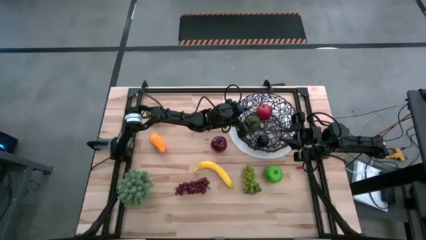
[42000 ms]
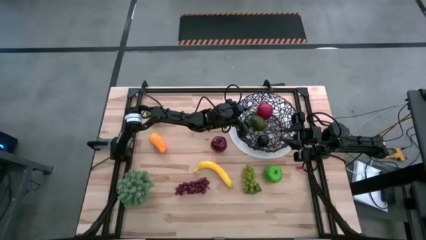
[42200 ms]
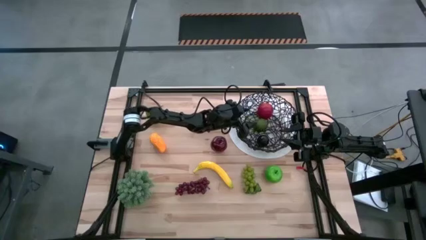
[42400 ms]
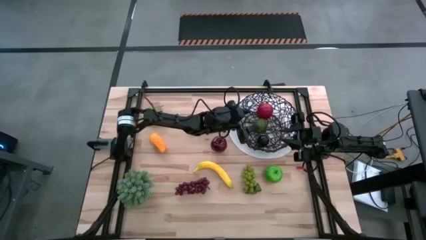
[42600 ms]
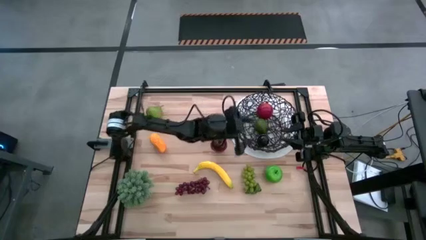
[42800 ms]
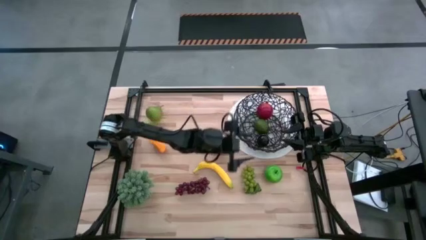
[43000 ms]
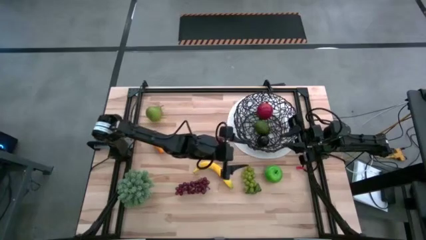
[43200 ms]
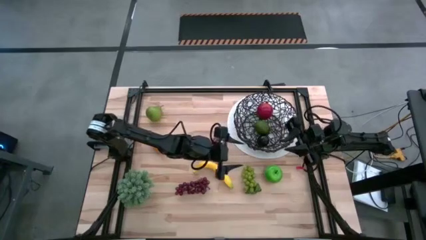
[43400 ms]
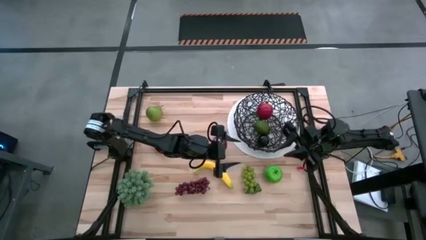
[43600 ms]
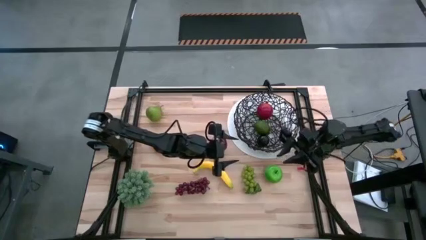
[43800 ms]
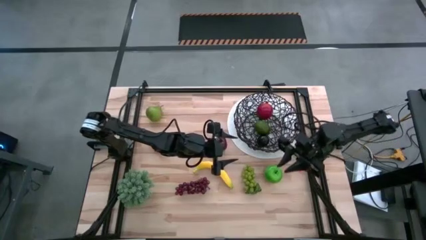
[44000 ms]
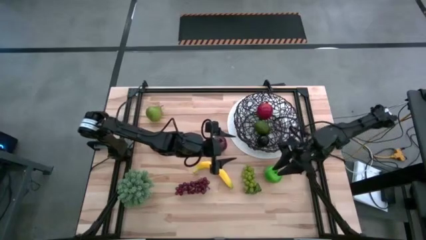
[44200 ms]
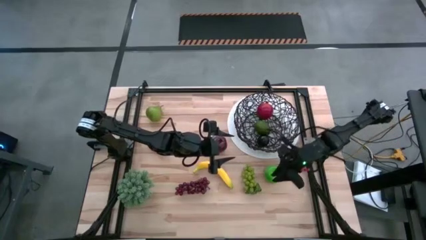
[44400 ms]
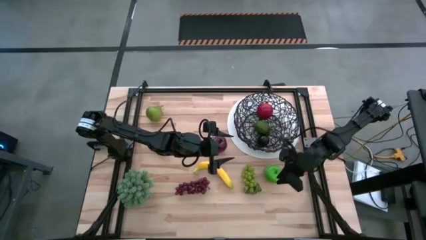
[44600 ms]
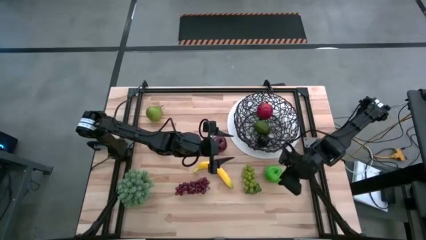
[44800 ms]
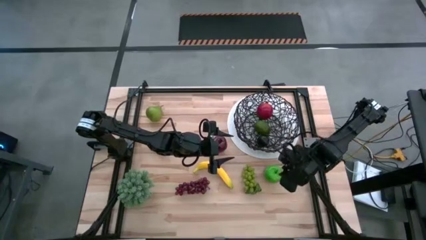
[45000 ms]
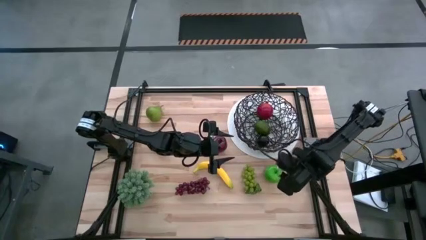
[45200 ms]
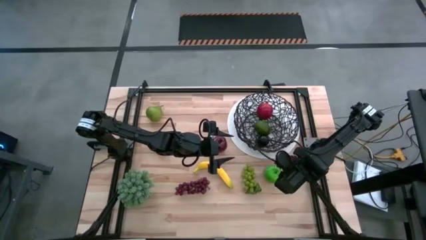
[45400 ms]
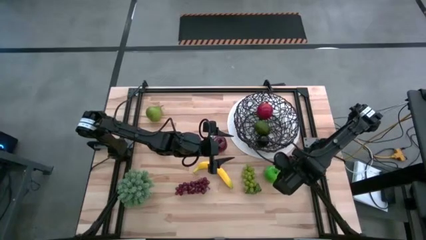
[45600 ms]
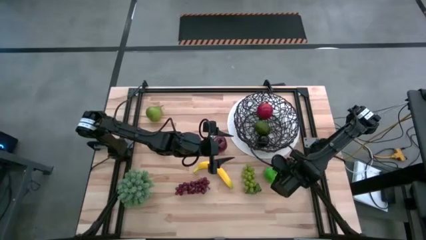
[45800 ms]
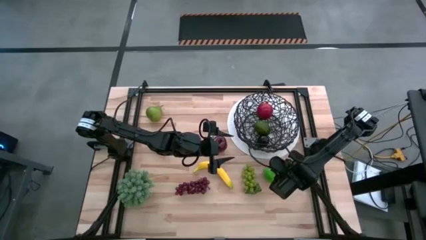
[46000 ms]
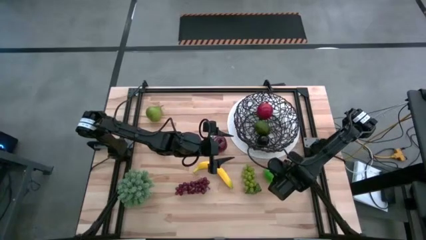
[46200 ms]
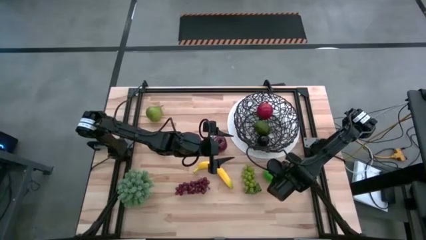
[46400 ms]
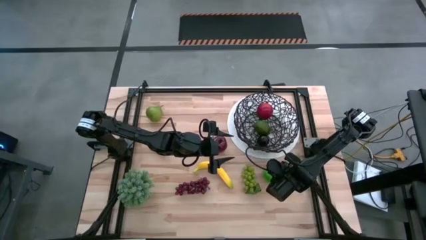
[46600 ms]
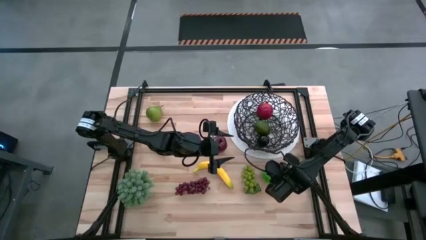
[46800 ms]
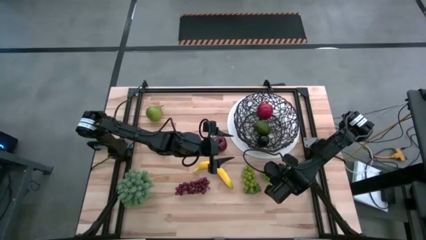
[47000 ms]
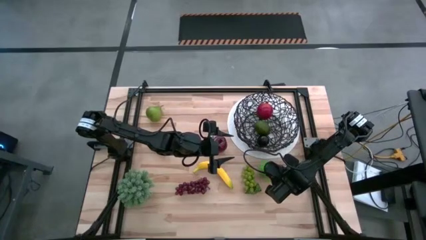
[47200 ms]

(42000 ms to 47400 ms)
Task: Build produce basket
Put the green apple into the wire basket

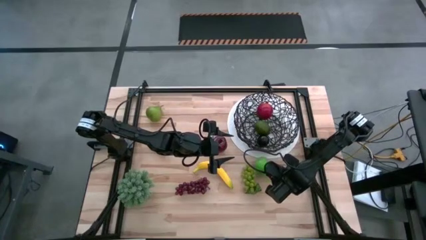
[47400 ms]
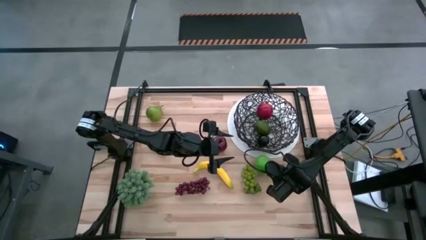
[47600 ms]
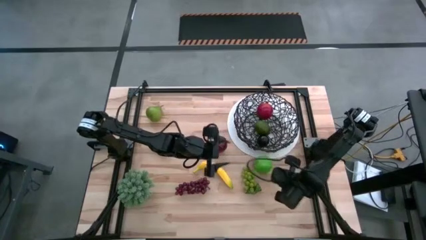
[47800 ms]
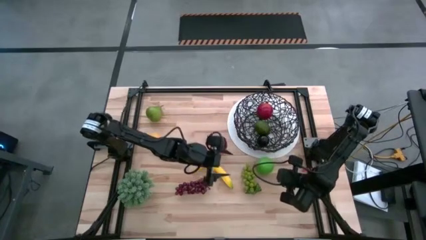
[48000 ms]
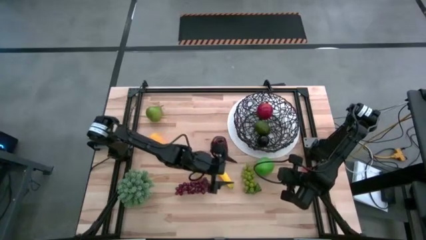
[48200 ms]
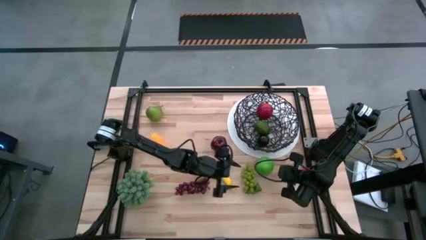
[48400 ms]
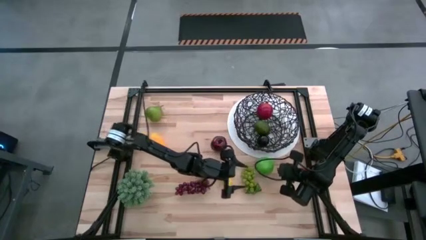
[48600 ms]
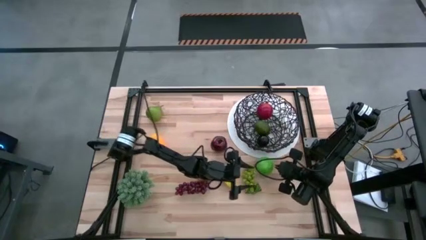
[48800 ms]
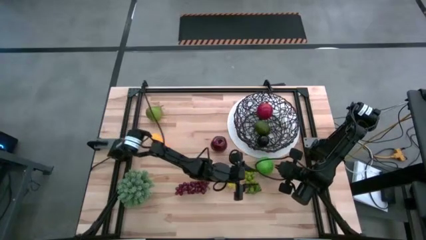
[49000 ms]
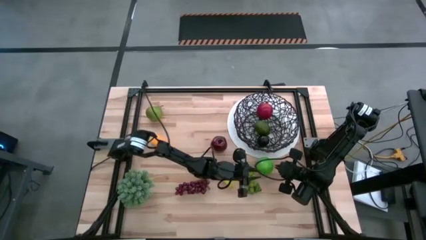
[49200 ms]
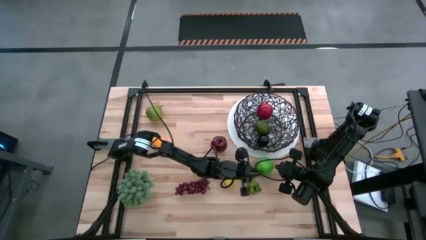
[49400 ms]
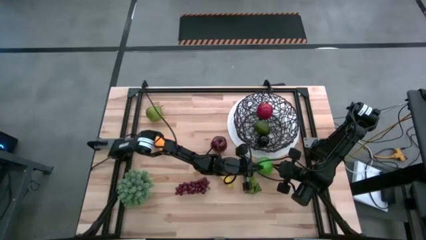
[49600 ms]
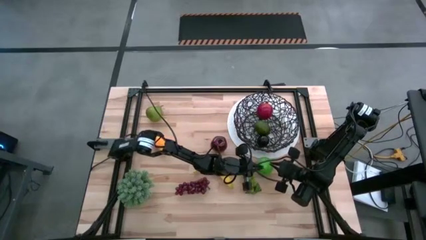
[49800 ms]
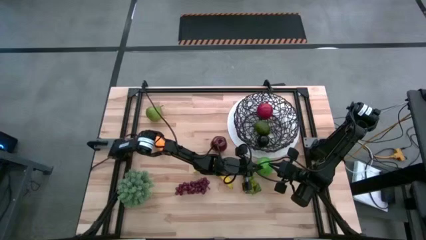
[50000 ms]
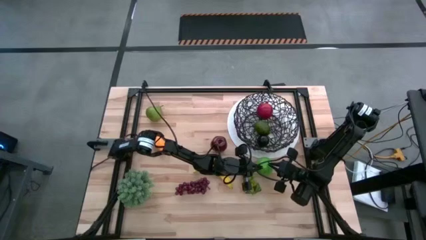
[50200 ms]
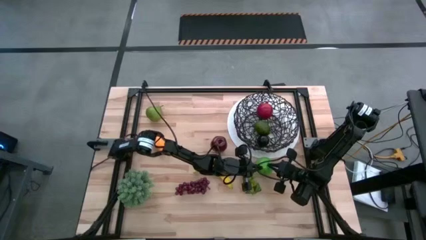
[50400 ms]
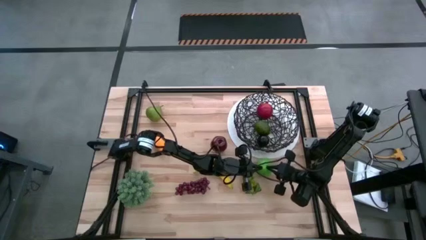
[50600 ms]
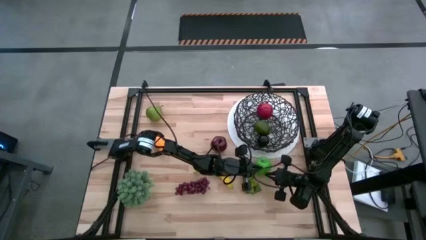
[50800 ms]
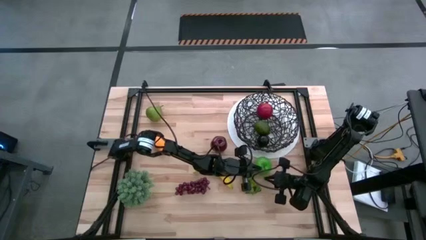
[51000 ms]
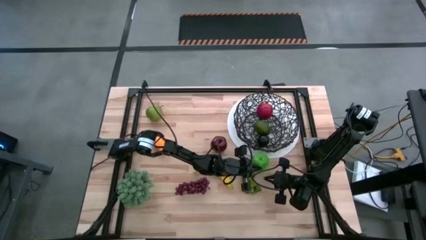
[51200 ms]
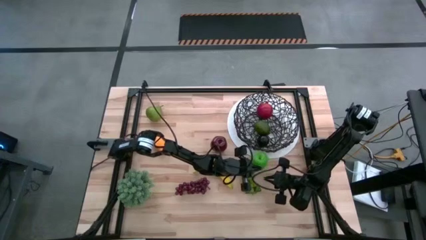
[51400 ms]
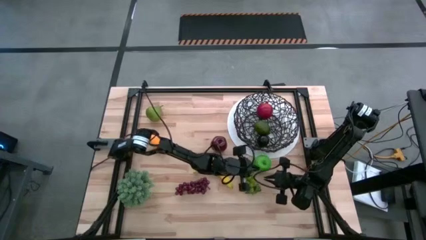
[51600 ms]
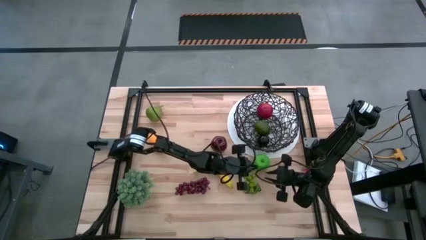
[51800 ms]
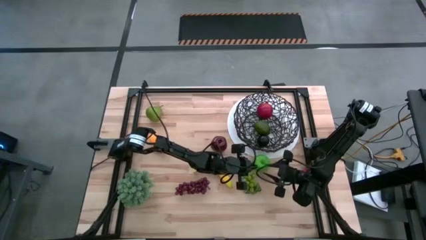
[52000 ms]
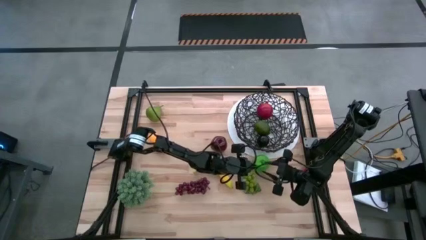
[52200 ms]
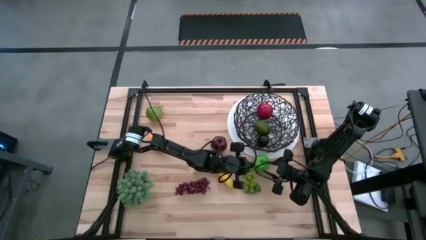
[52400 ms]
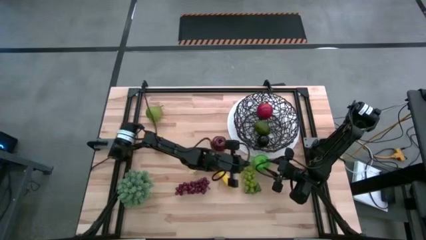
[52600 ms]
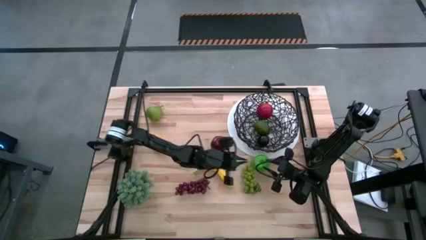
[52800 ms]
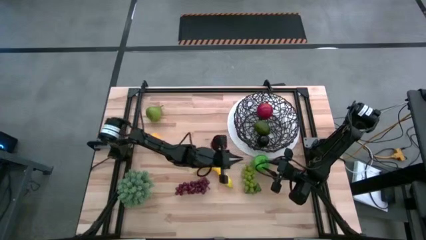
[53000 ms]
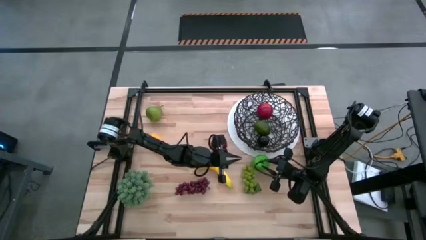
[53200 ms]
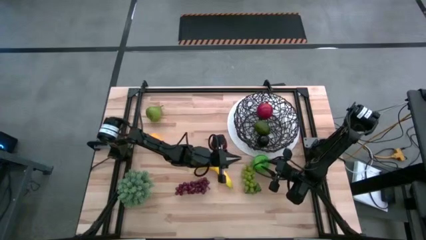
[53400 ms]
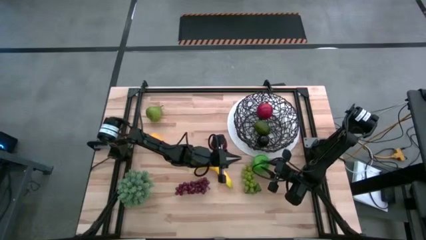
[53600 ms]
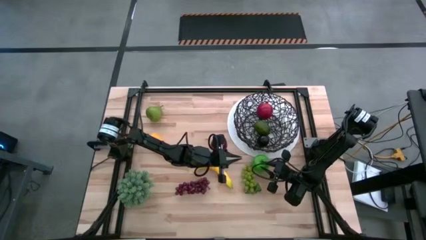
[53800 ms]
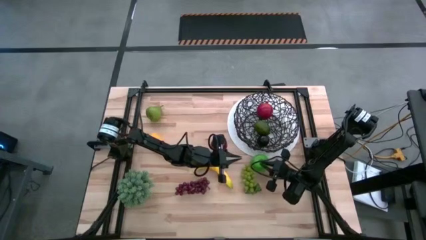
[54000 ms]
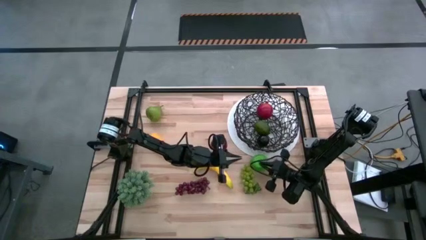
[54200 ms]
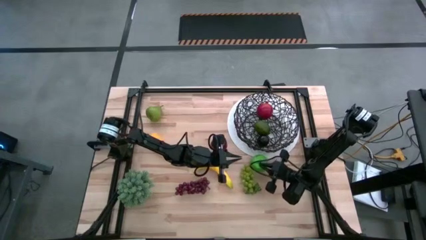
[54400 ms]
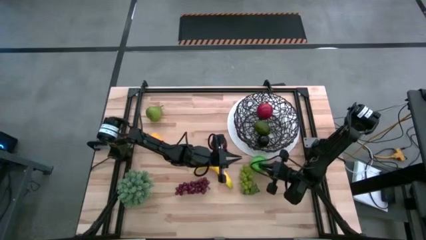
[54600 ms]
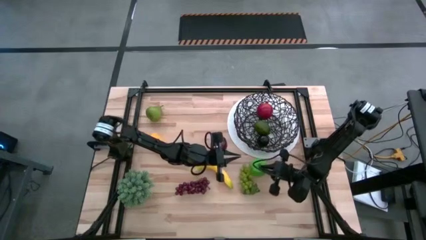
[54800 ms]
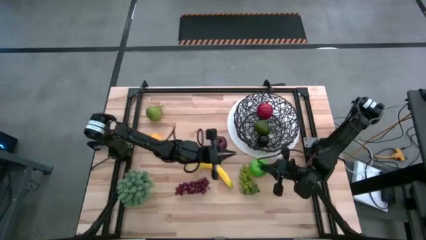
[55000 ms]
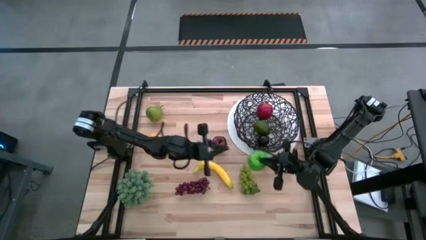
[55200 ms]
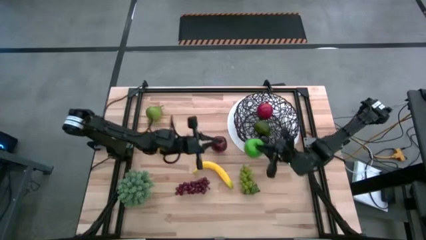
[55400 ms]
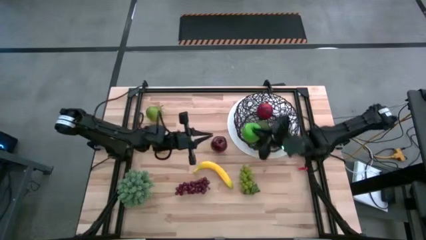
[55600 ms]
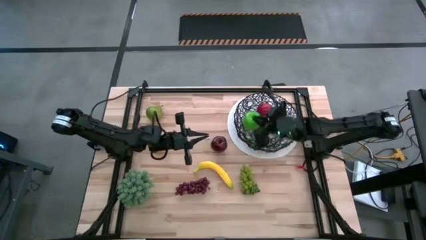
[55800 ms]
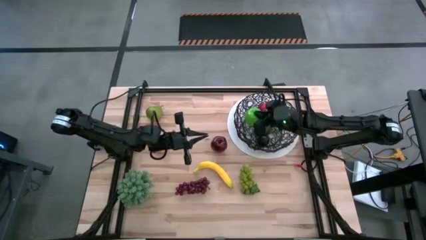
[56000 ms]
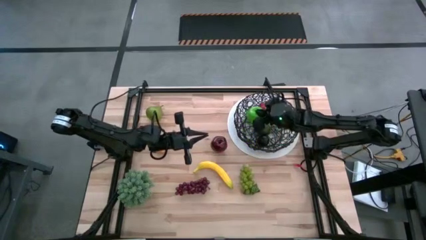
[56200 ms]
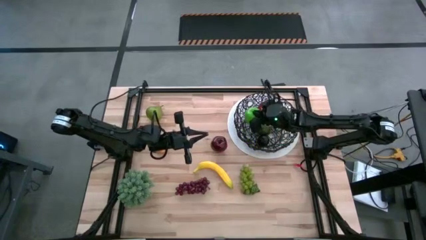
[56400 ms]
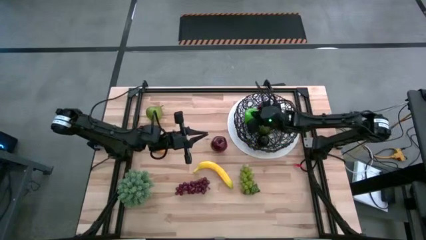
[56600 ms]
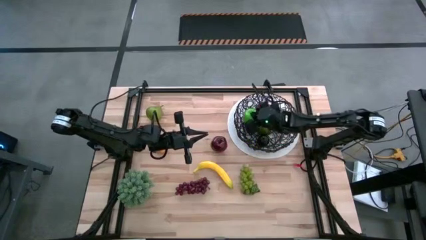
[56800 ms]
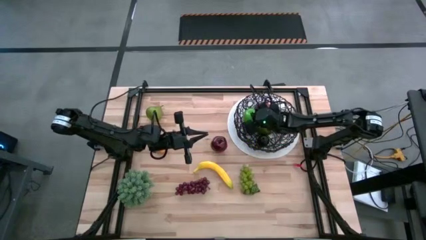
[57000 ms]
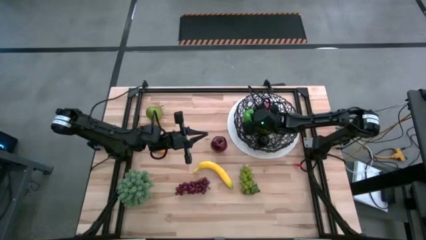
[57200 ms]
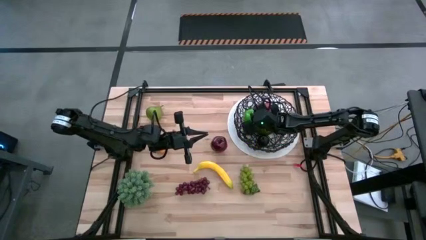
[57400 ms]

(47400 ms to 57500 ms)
Put the green apple into the wire basket

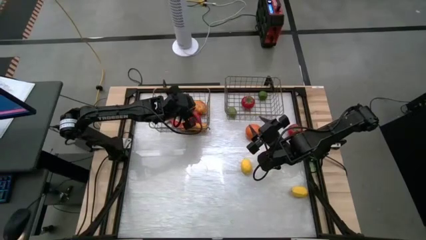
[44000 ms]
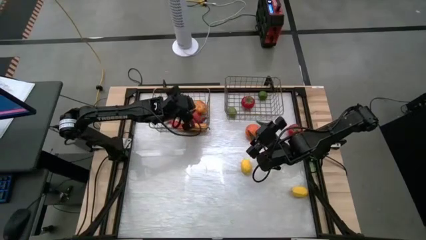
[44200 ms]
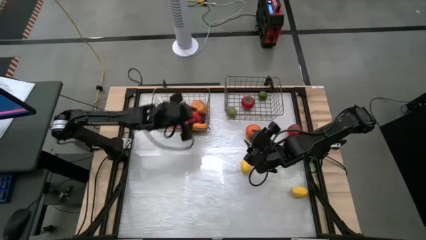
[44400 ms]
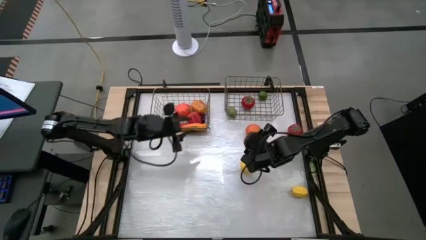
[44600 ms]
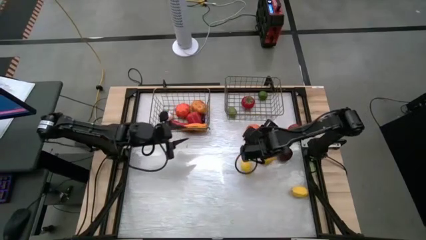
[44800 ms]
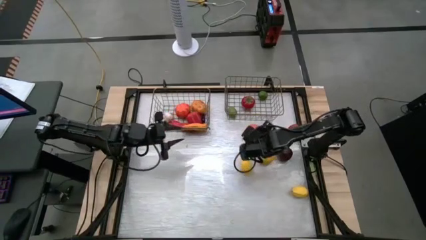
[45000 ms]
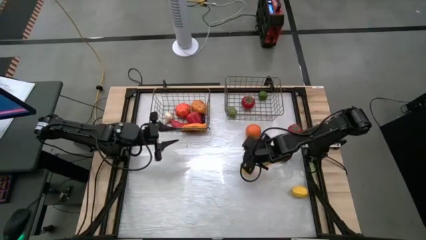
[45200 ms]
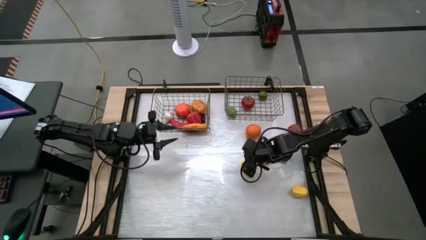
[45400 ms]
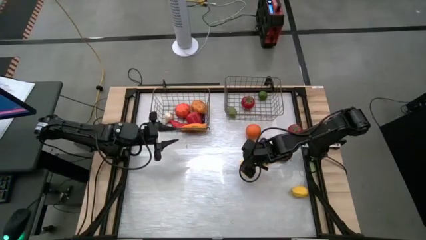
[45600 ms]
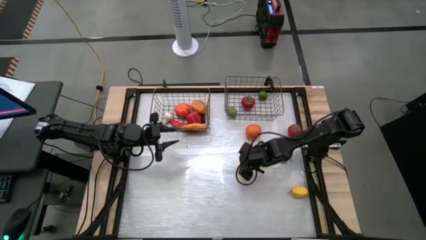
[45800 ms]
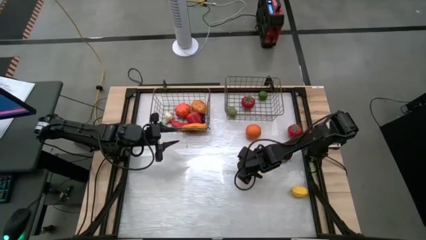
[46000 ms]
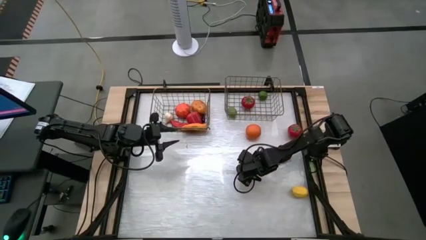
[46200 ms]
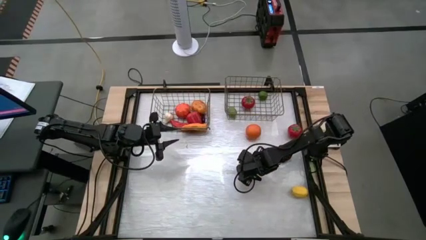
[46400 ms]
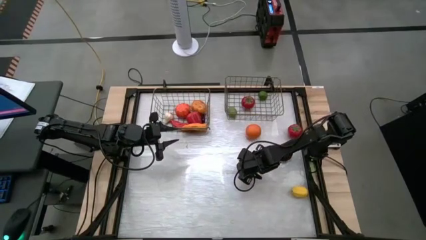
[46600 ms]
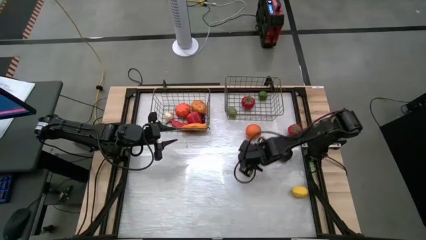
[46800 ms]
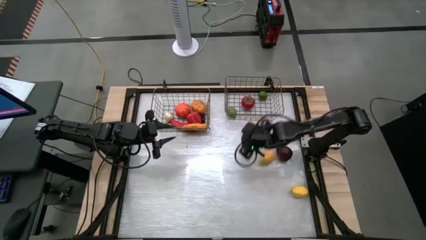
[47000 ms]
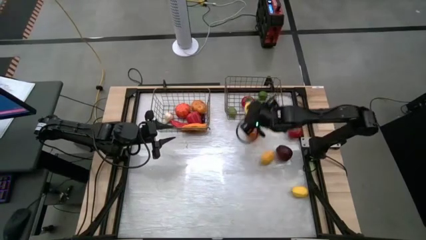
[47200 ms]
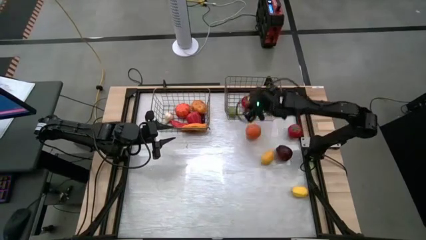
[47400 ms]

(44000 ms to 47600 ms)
Task: Sort produce into baskets
Put the top left yellow lemon into the right gold wire basket
